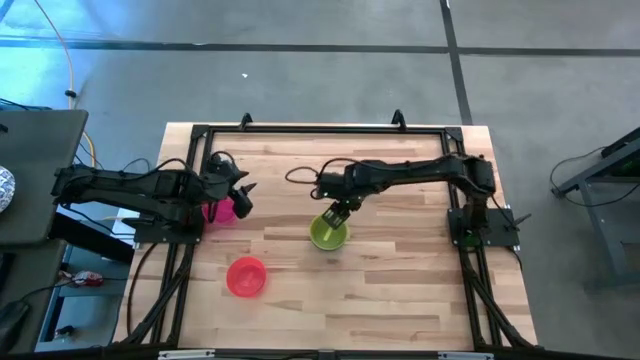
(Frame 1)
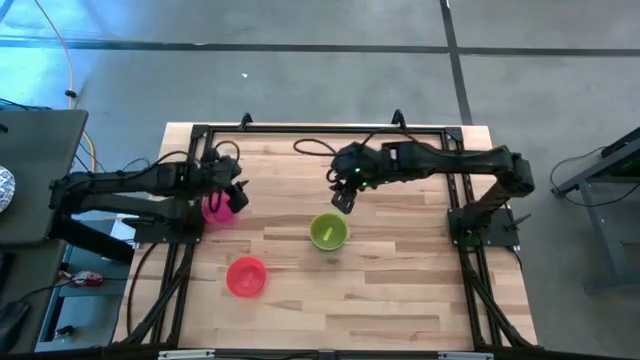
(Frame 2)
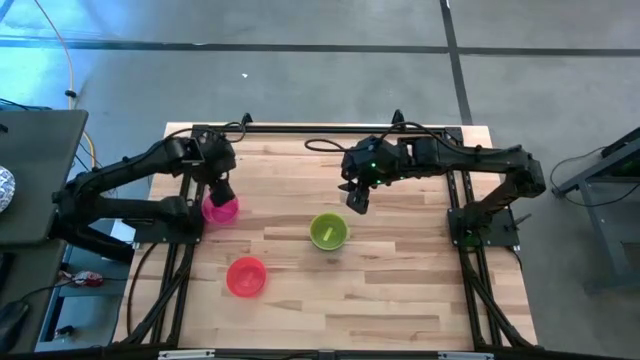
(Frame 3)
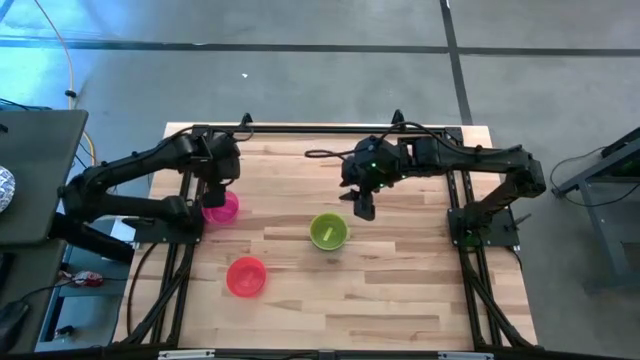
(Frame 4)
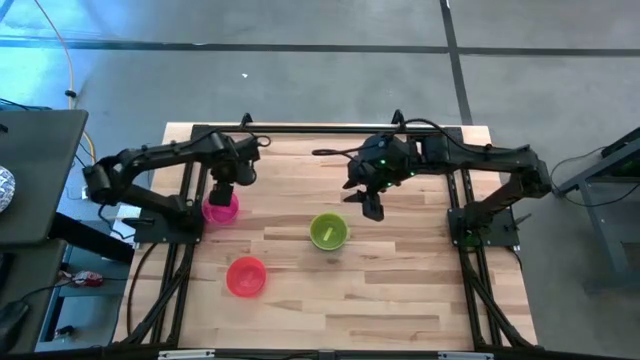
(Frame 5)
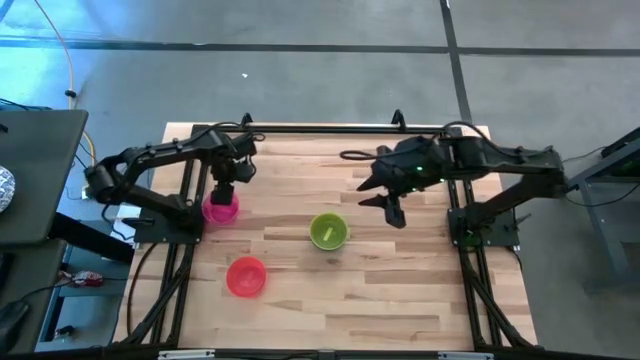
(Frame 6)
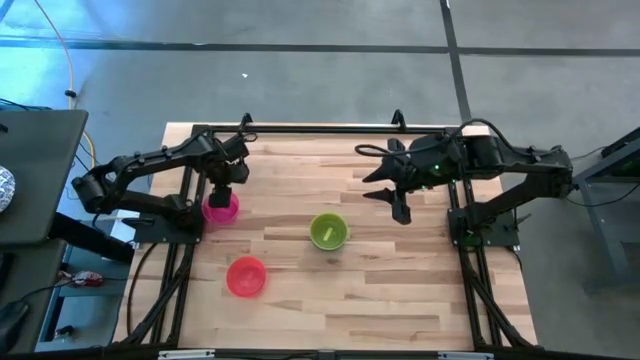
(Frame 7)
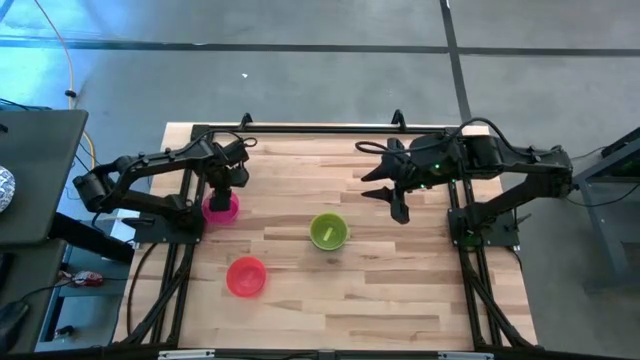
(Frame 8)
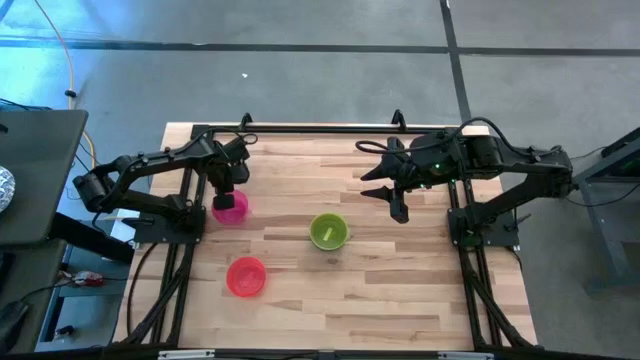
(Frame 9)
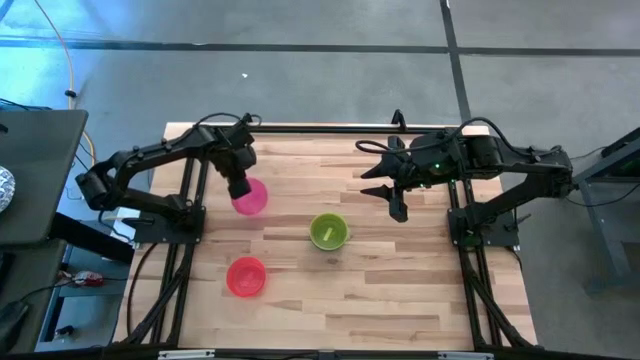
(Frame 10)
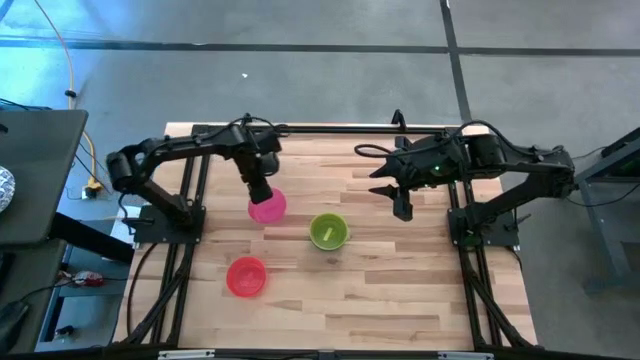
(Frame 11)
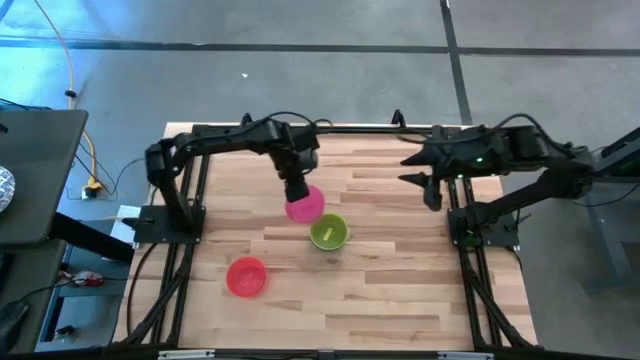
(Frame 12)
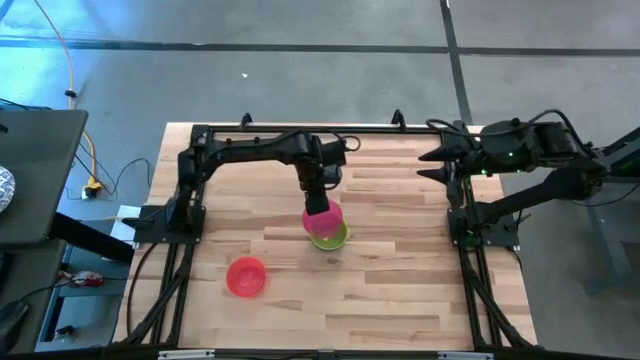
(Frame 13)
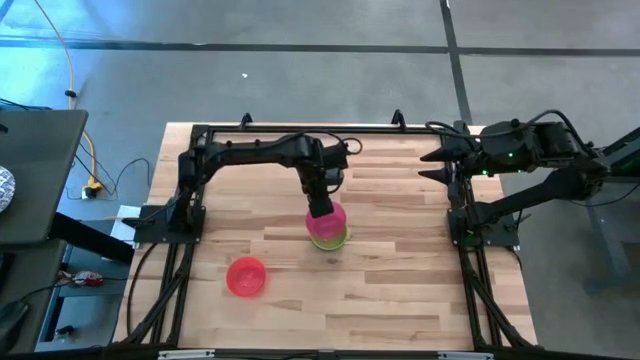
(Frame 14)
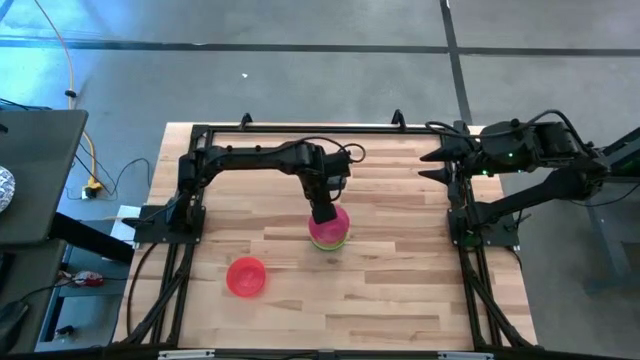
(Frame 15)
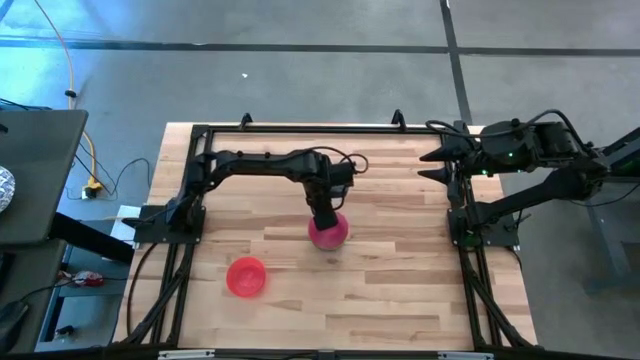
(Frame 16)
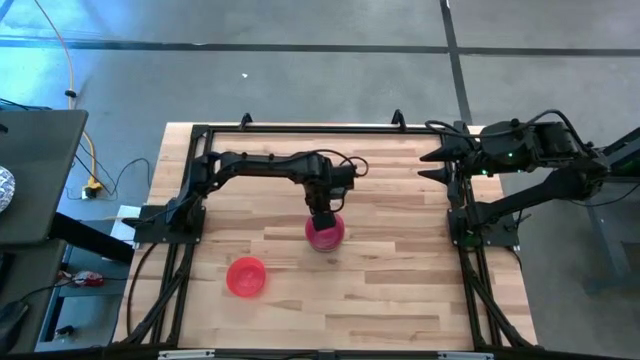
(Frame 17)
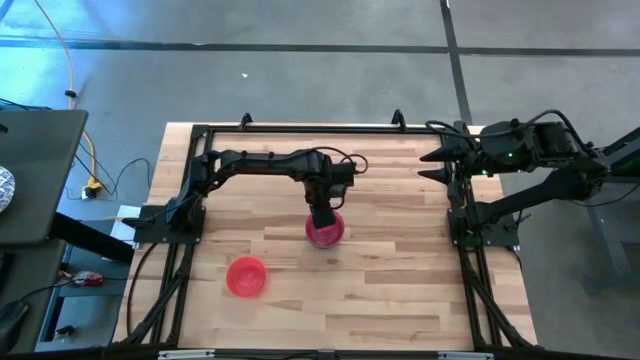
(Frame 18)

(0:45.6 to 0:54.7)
Task: Nest bowls inside each other
Stack the pink bowl on the yellow bowl

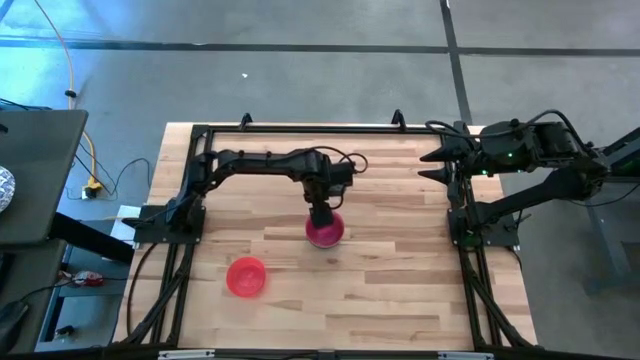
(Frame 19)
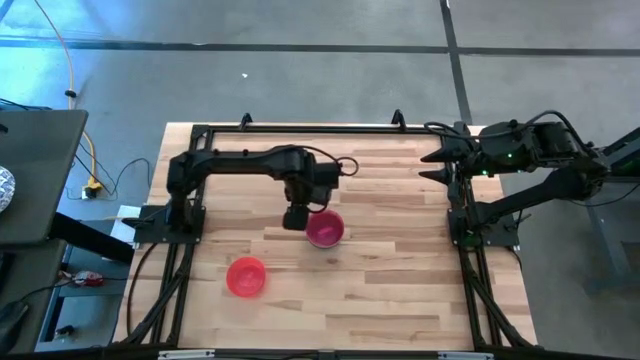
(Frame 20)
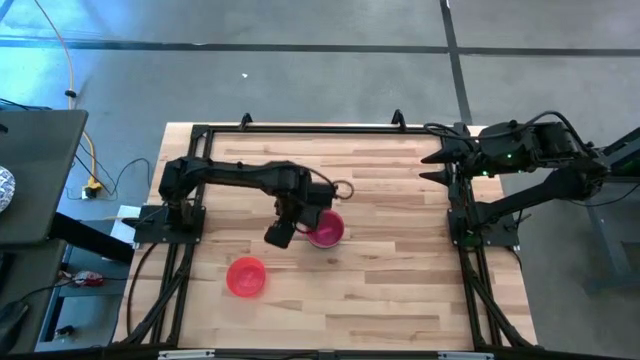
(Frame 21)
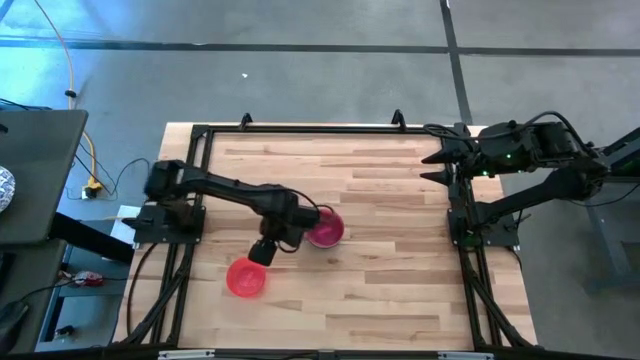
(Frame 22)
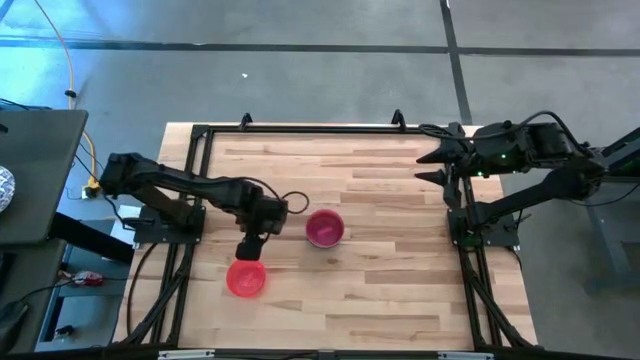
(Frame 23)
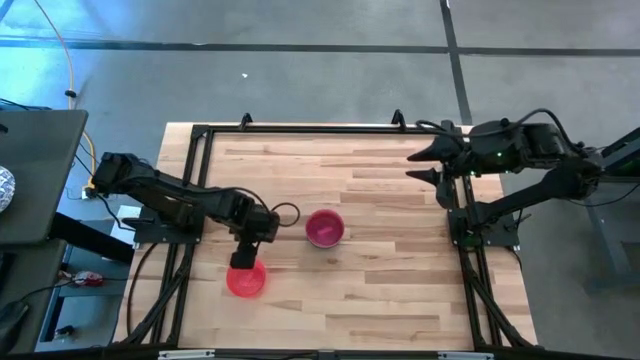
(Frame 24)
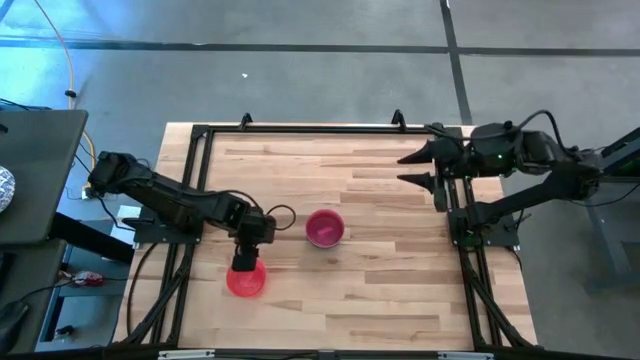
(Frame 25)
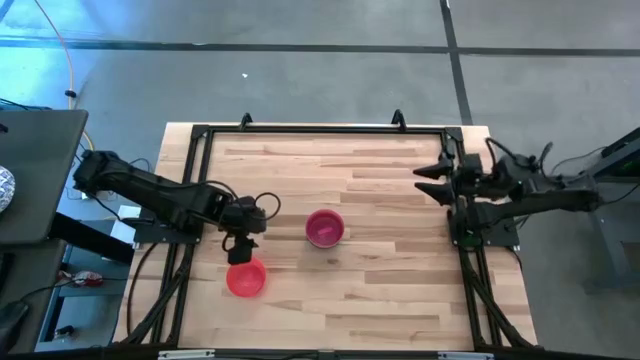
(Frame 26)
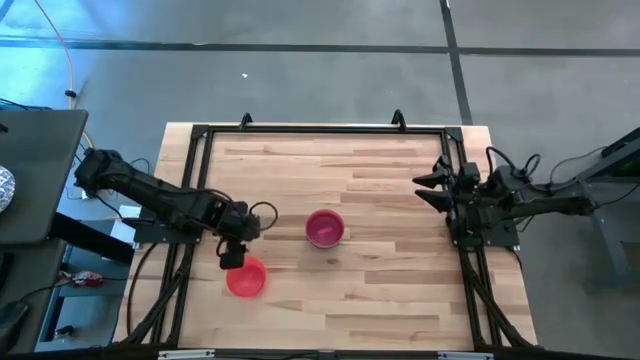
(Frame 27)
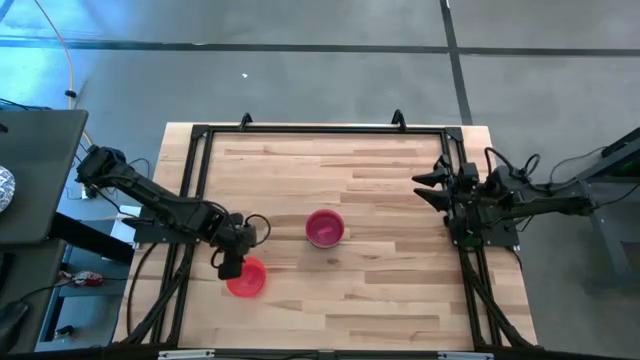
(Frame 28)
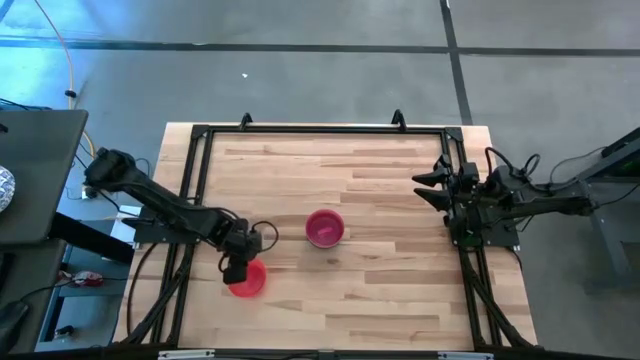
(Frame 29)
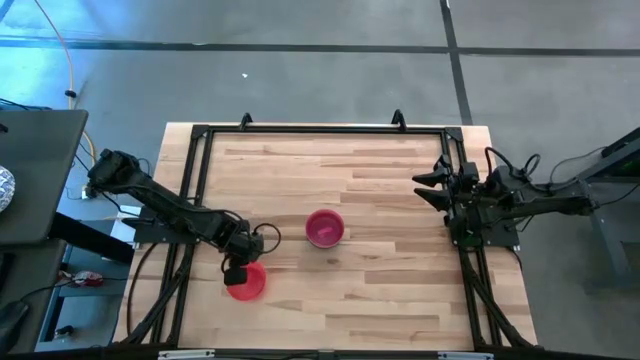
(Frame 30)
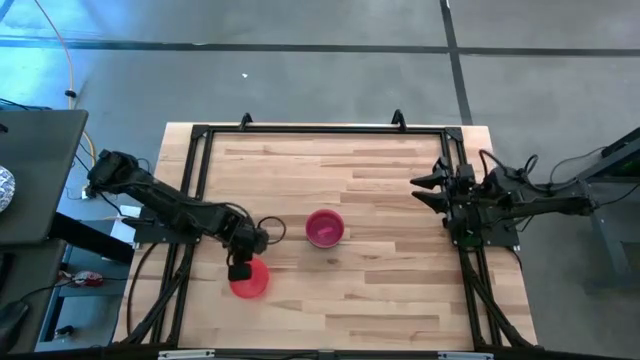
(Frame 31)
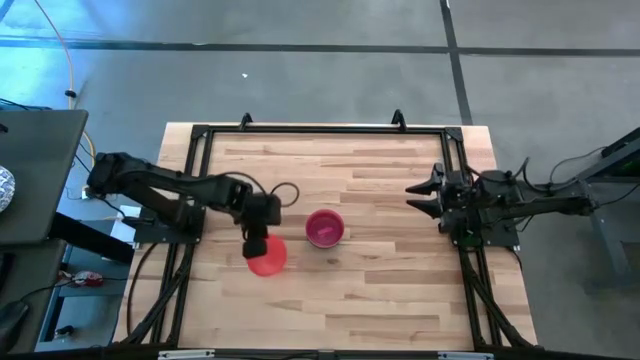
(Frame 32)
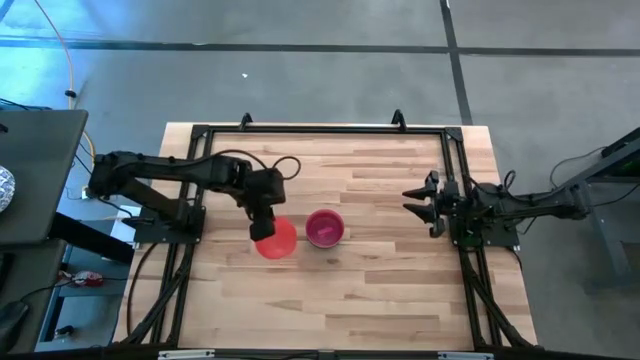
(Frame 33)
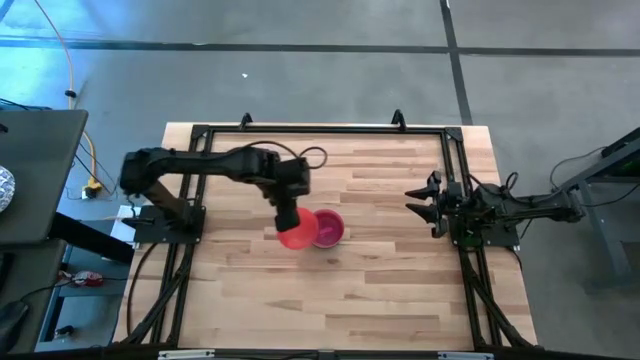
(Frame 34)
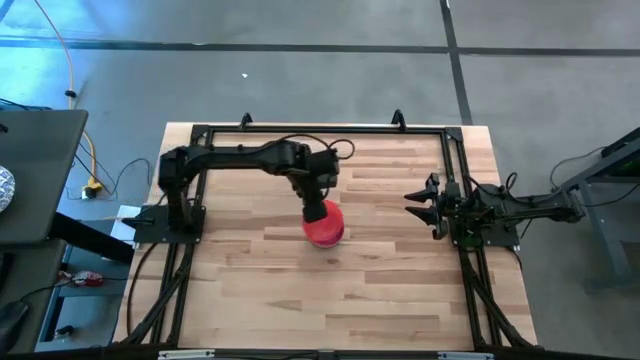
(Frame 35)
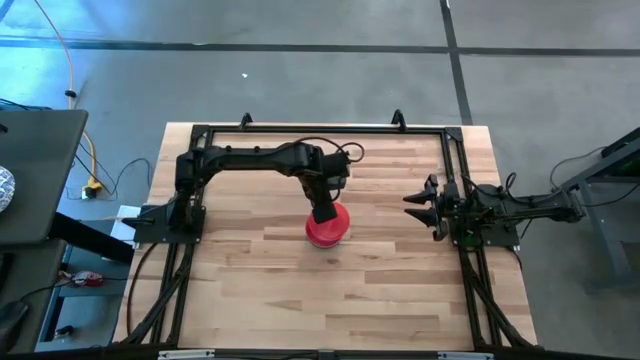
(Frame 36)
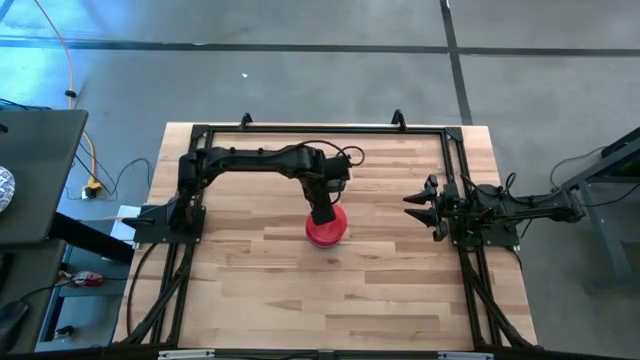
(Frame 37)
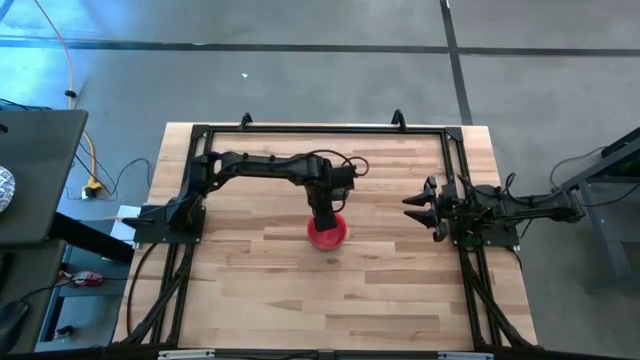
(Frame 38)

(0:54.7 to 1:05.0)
Stack the orange bowl on the pink bowl

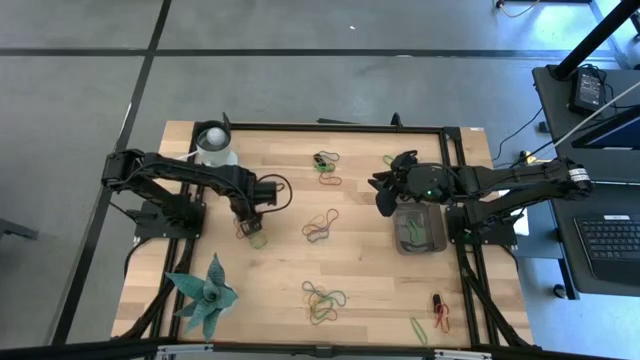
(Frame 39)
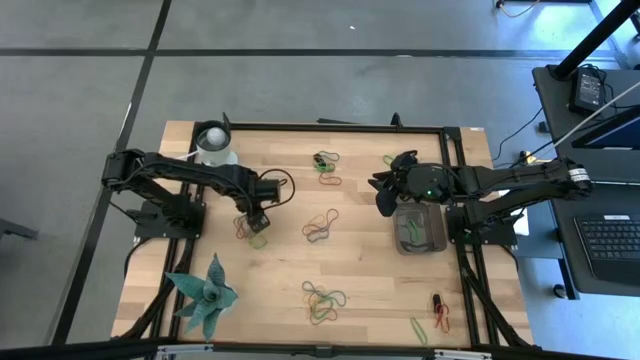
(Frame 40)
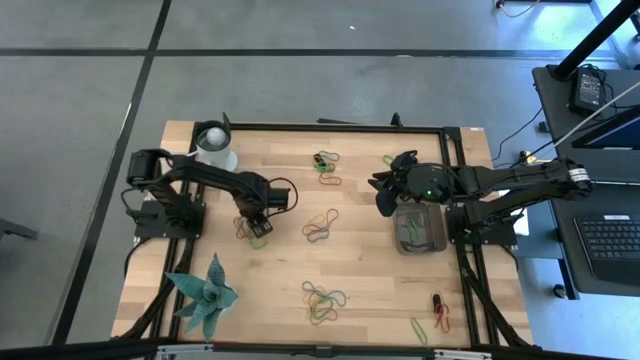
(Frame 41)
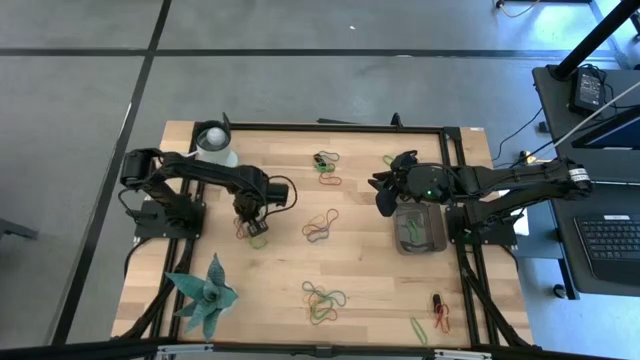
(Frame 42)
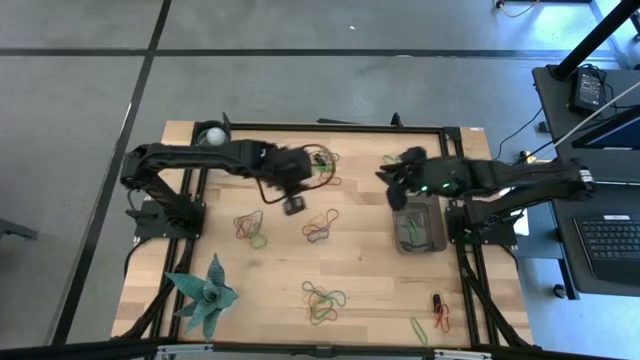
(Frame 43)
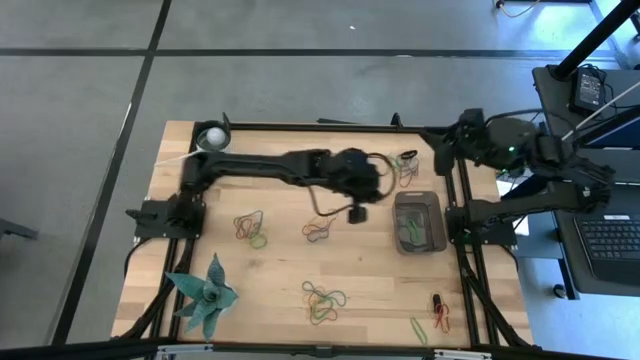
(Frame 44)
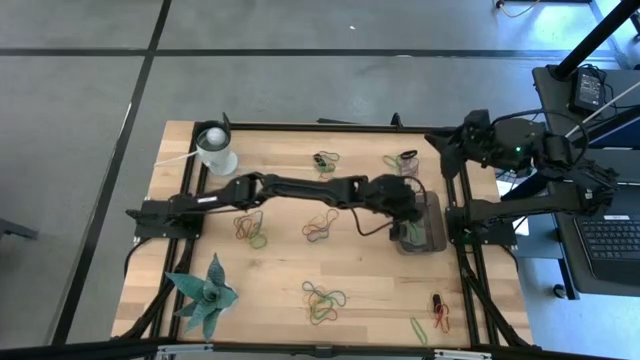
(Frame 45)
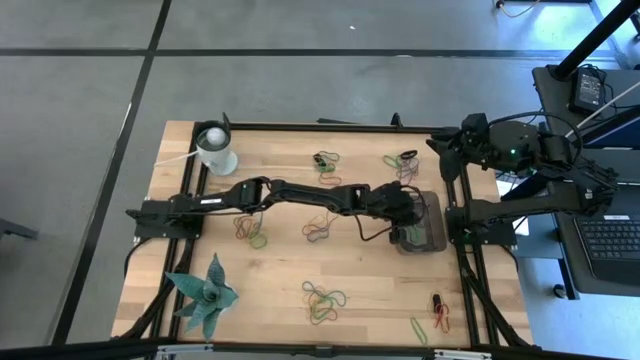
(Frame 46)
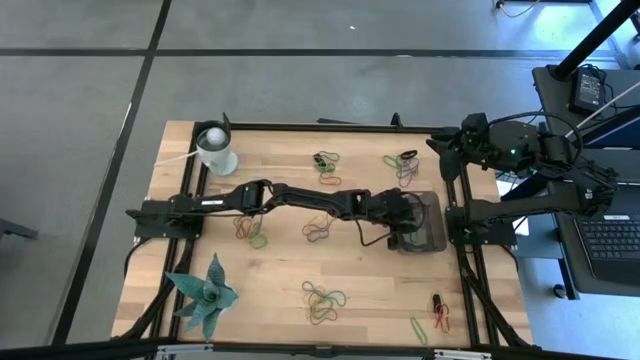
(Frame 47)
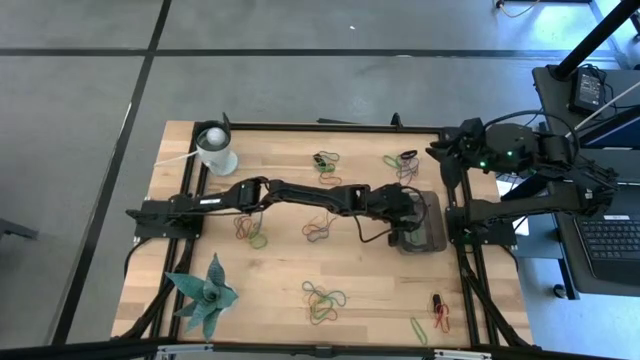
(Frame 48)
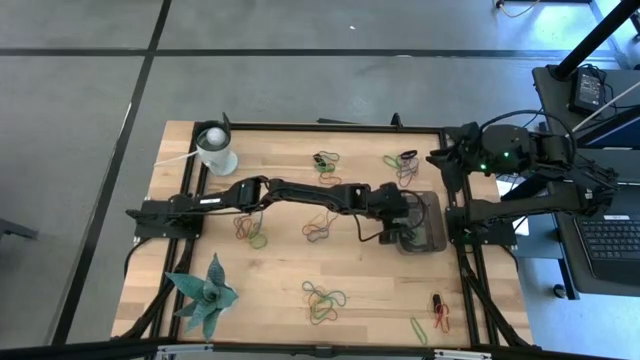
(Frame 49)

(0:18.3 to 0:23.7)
Task: Pick and place rubber bands into bin
Put the black rubber band into the black bin
